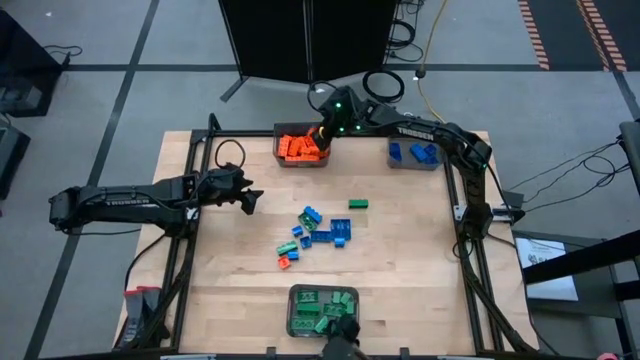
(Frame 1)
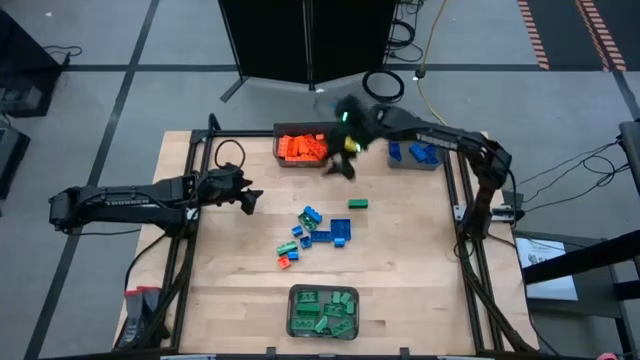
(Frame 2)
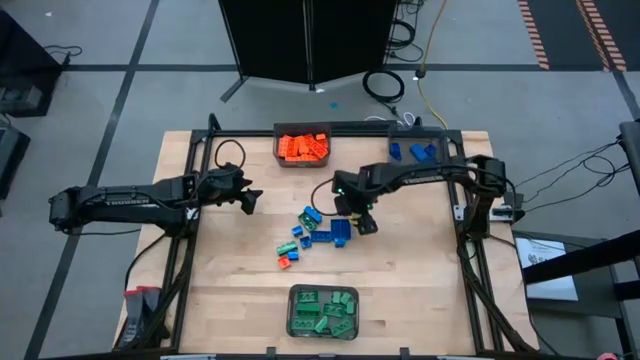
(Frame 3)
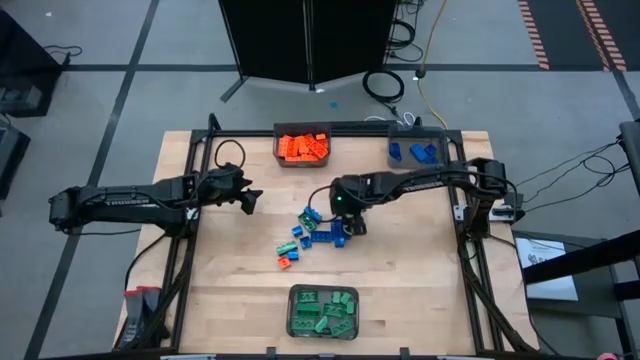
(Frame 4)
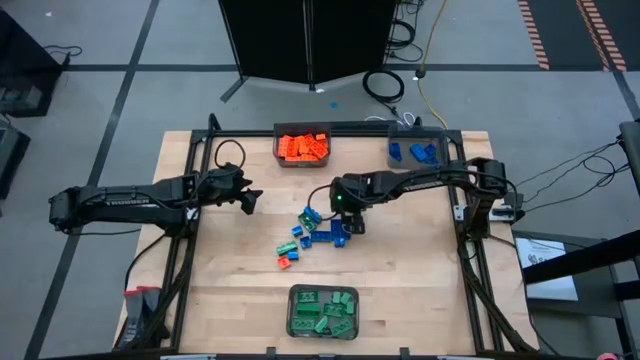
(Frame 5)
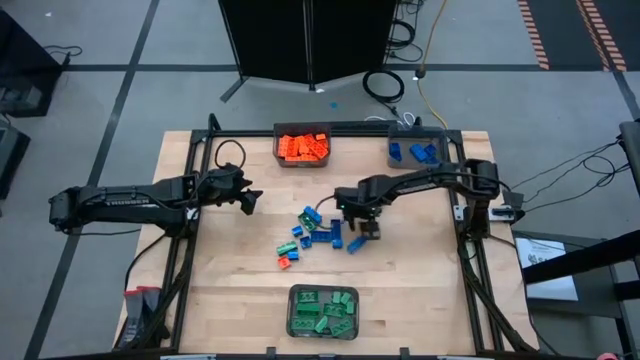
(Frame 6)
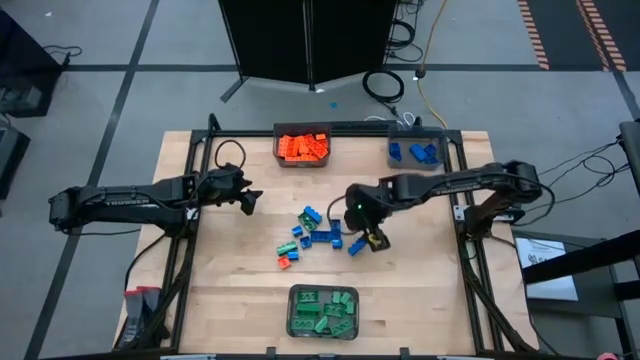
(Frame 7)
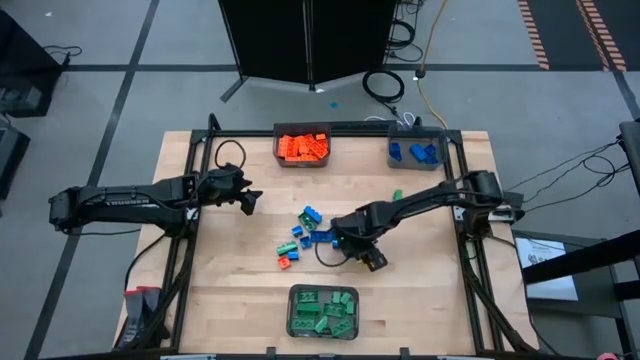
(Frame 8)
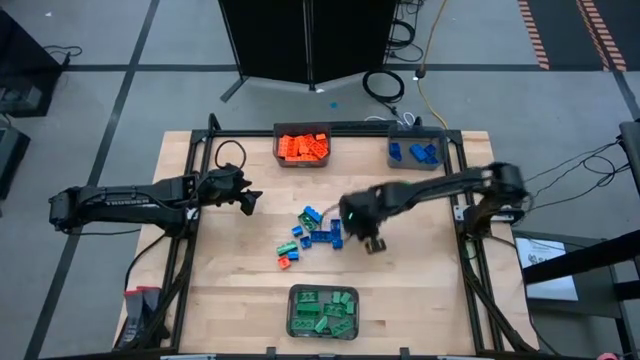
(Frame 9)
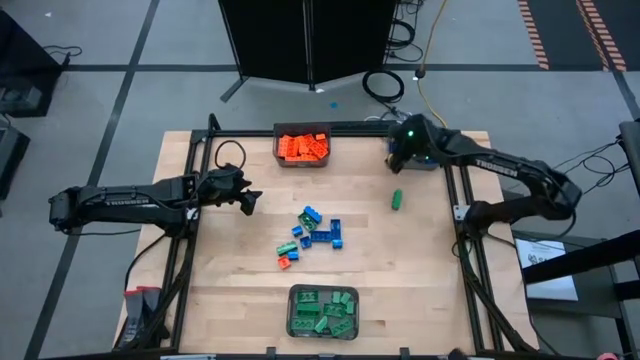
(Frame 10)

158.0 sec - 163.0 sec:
Task: Sort blocks
Put the blue game piece into the top right black bin

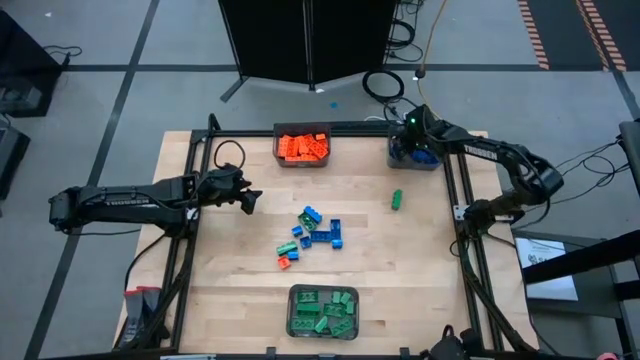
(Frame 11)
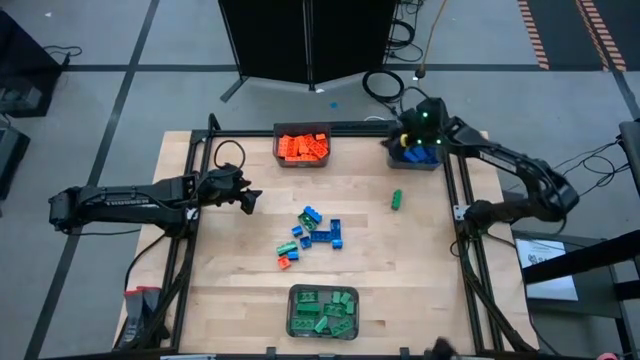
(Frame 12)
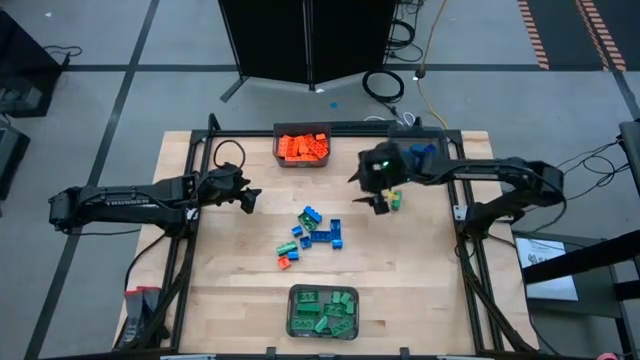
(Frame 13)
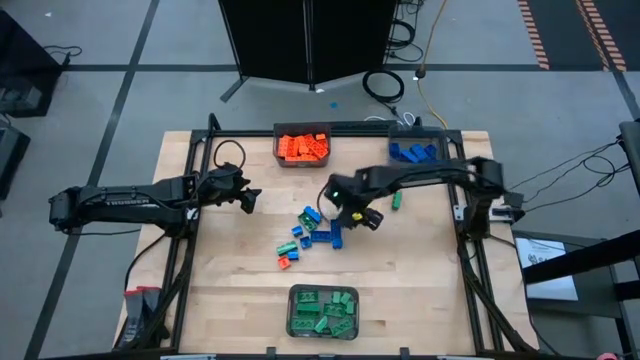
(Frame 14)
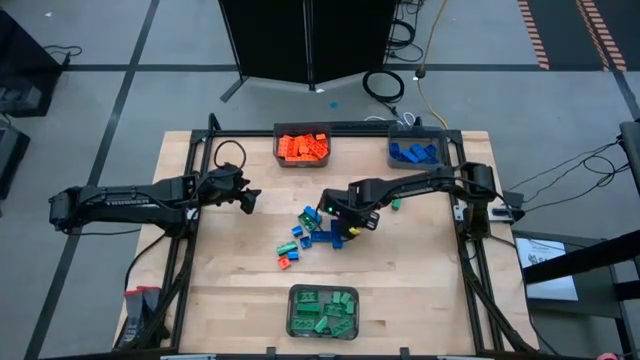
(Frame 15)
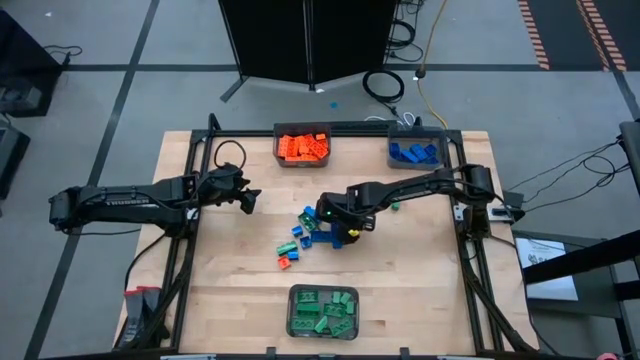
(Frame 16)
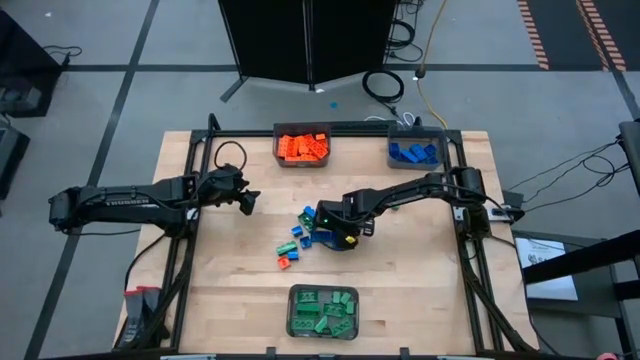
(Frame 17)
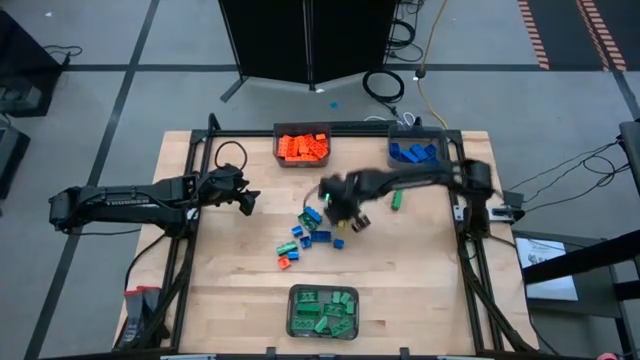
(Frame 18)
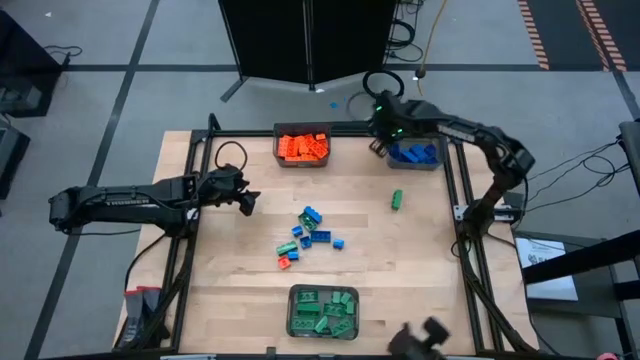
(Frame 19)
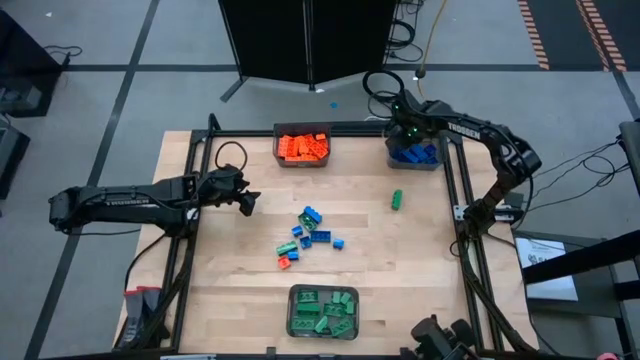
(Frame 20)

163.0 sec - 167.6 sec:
Put the blue game piece into the top right black bin

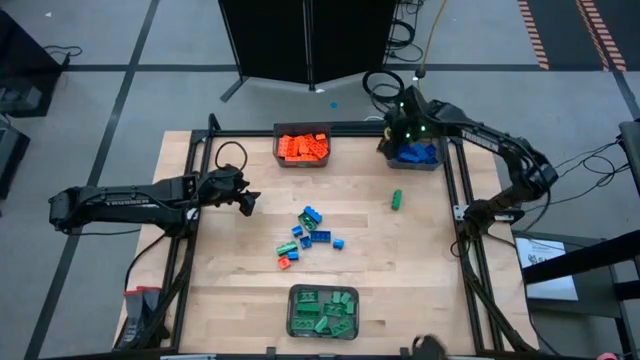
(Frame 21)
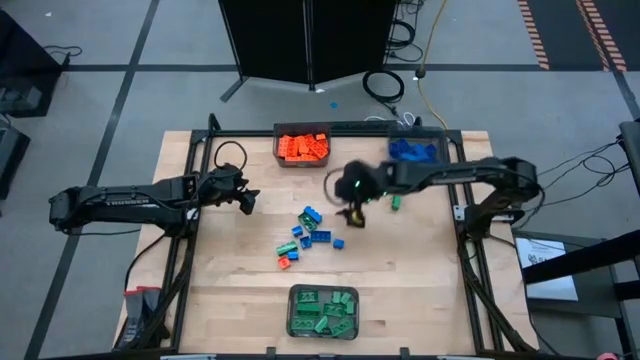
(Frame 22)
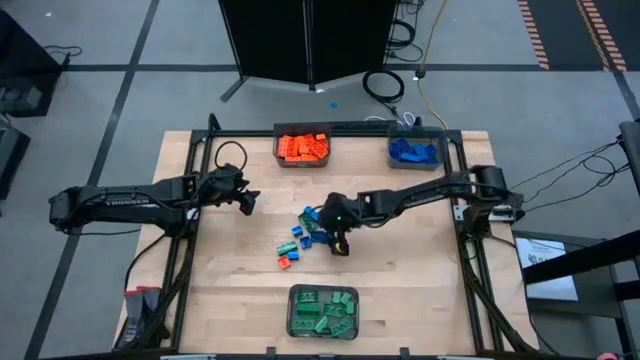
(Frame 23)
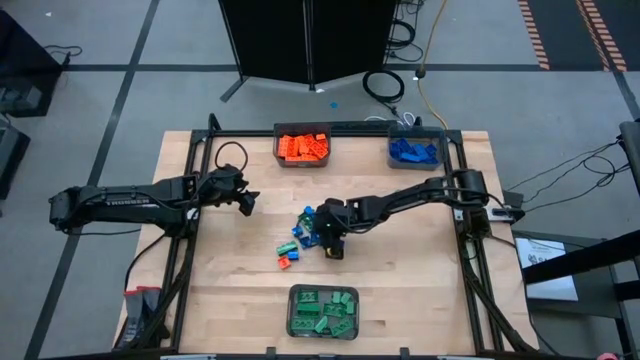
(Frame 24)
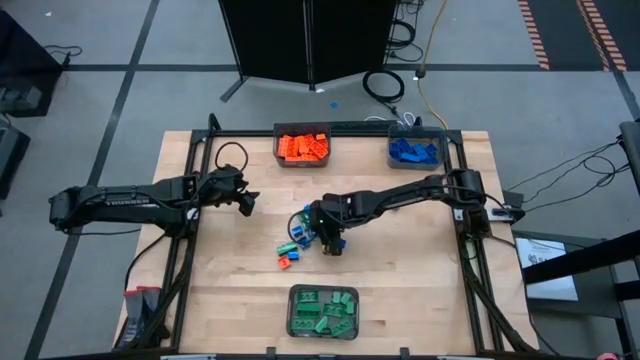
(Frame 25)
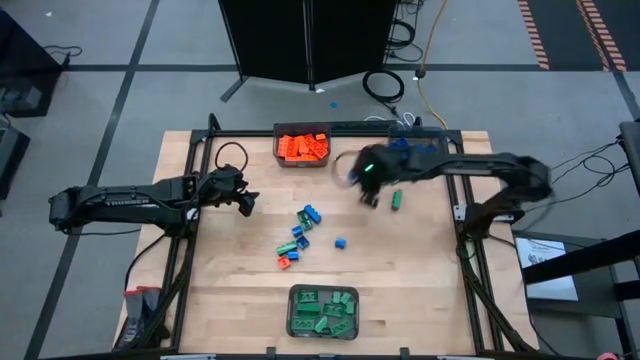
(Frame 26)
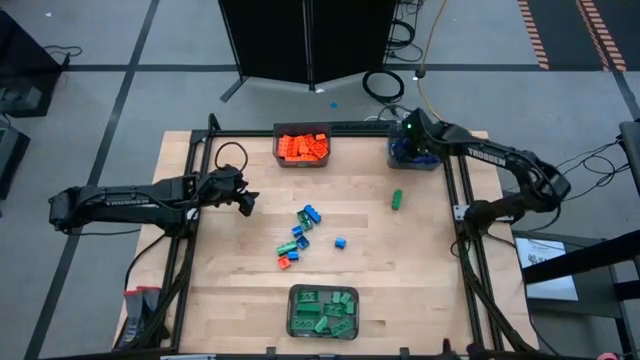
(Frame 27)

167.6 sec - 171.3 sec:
Put the blue game piece into the top right black bin

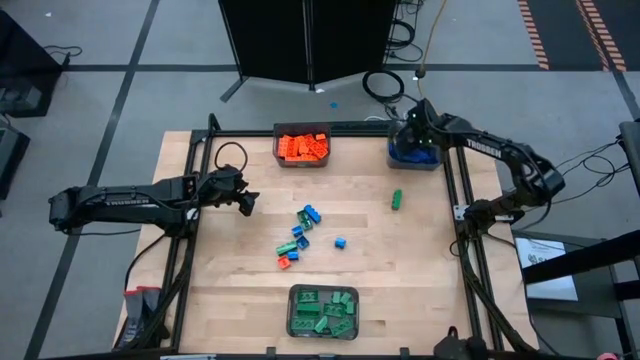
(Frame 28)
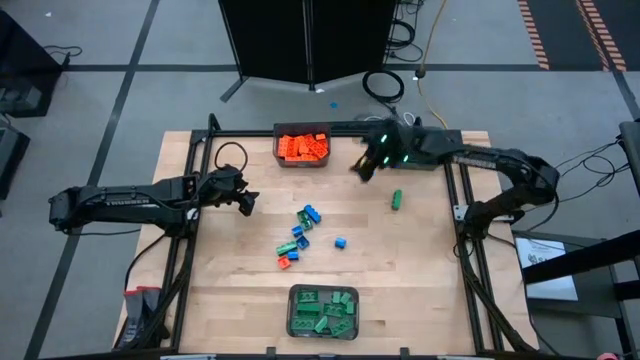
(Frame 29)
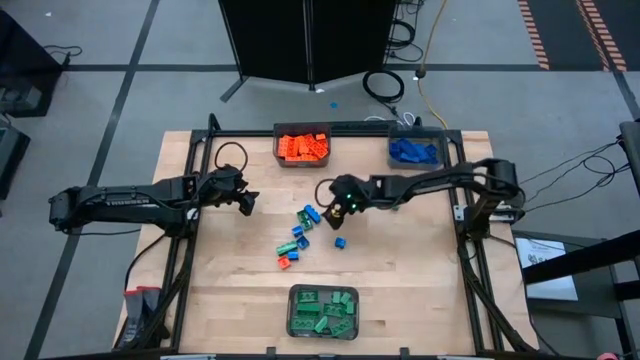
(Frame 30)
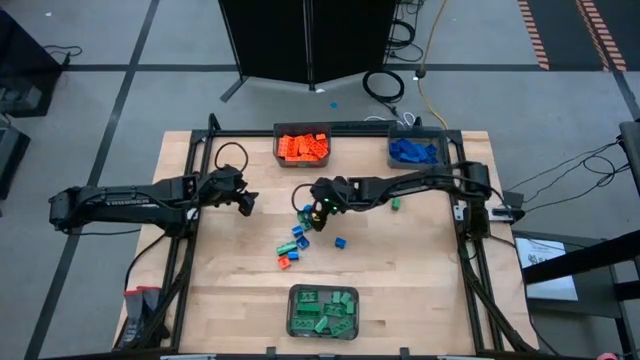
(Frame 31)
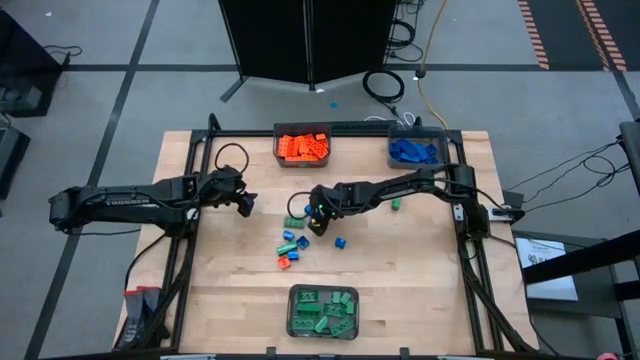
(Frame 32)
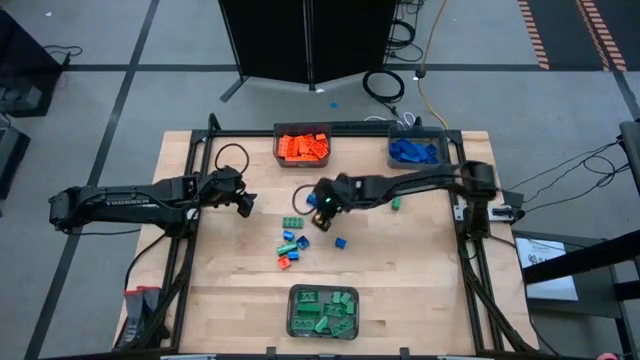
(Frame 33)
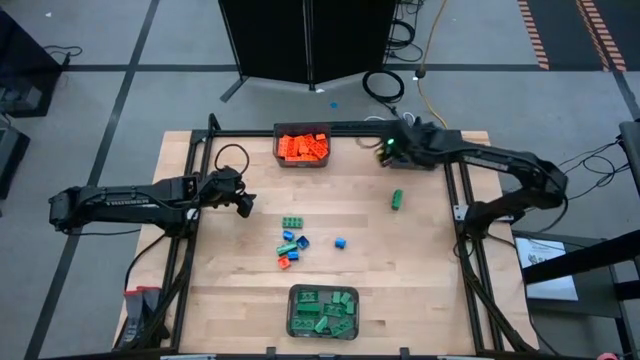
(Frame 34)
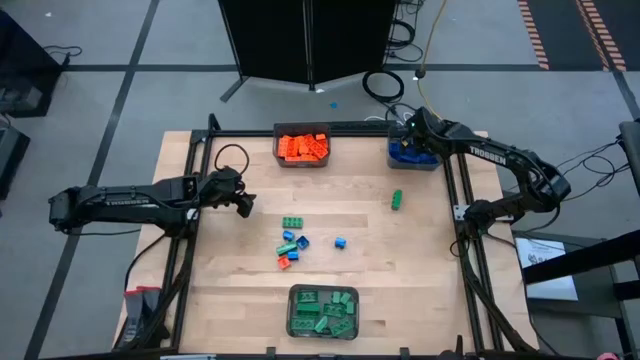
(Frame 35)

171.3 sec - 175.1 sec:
Put the blue game piece into the top right black bin

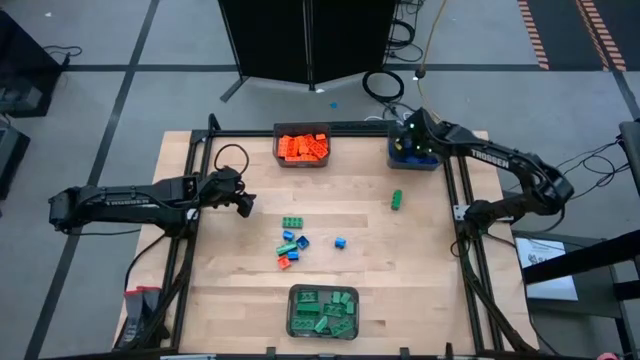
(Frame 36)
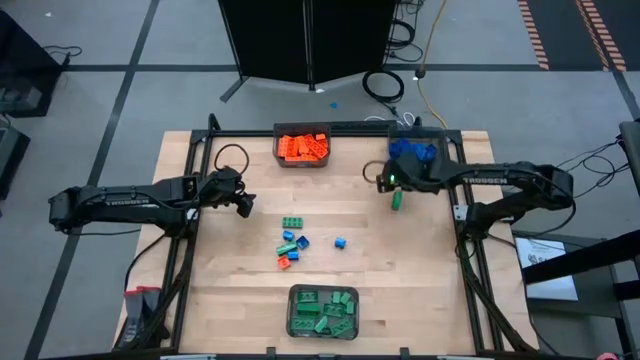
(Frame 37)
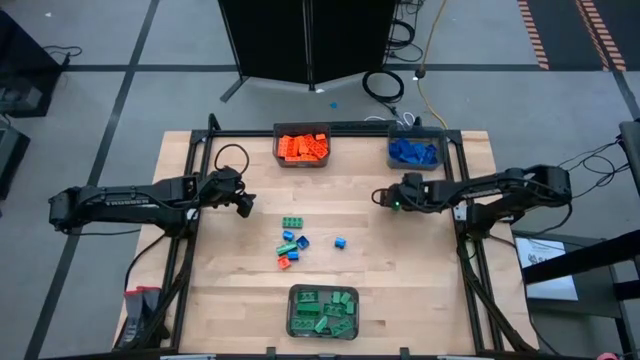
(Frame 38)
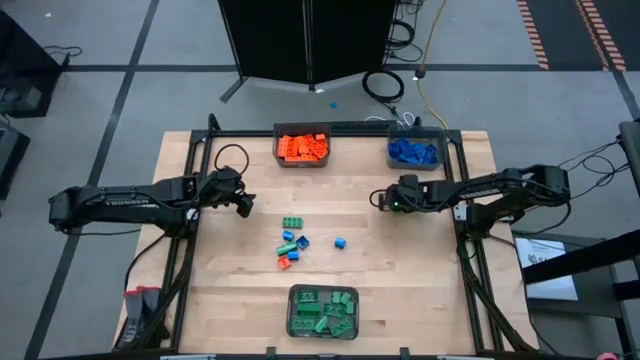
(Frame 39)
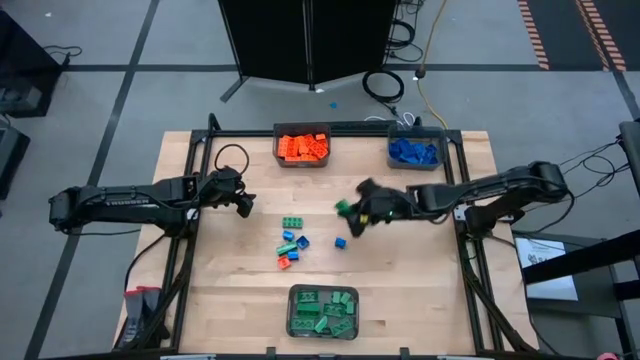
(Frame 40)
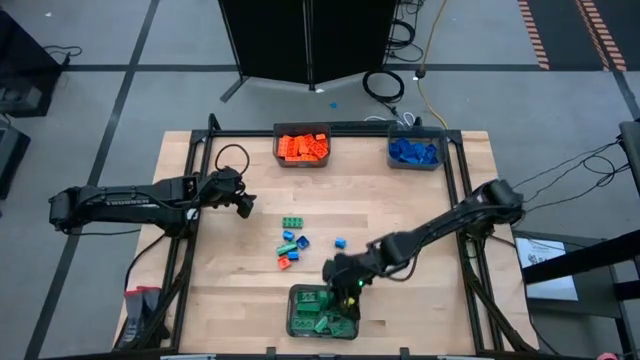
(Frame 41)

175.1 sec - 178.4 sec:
Put the green game piece into the bottom black bin
